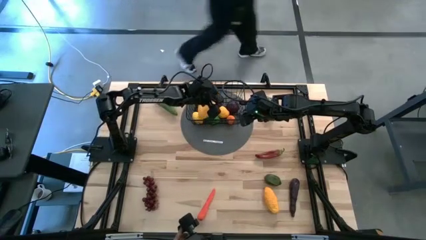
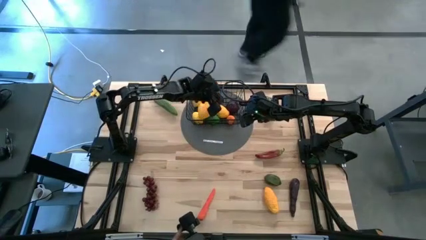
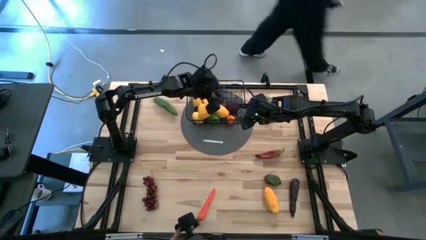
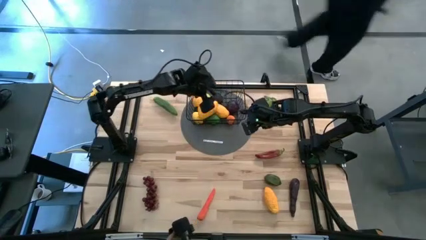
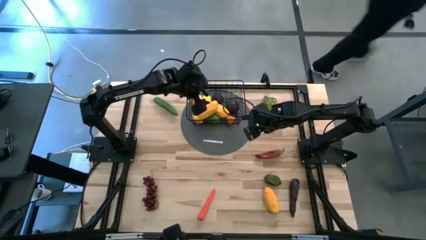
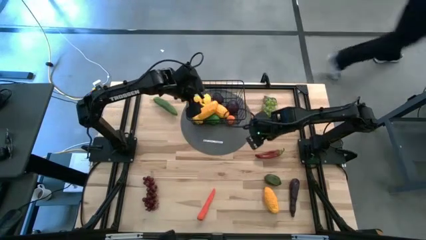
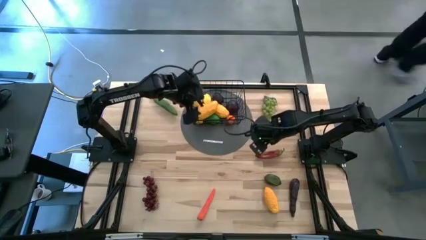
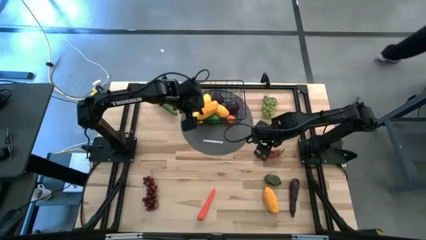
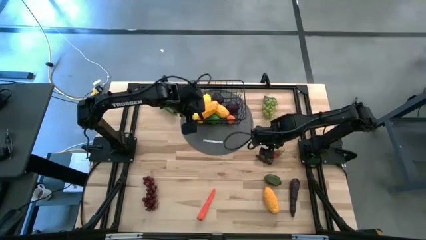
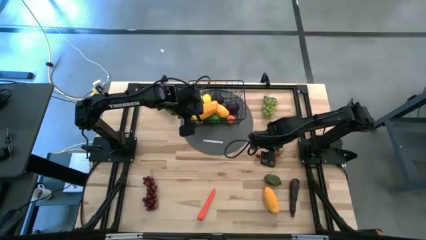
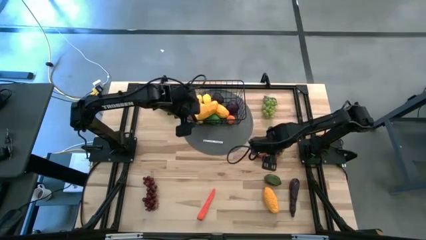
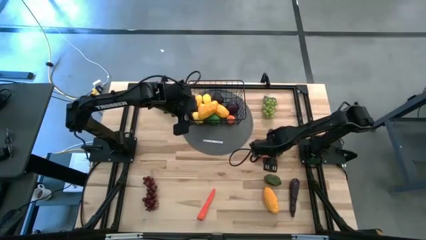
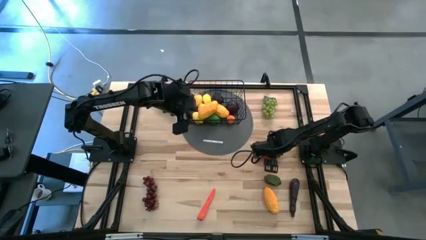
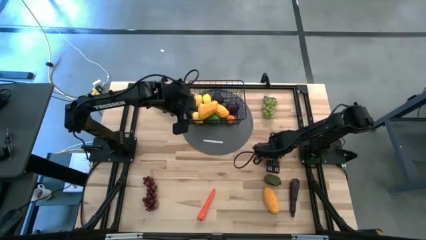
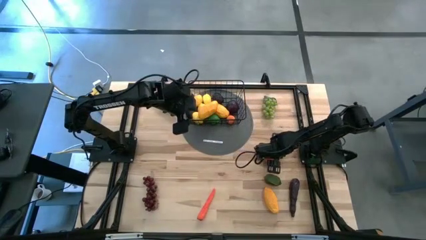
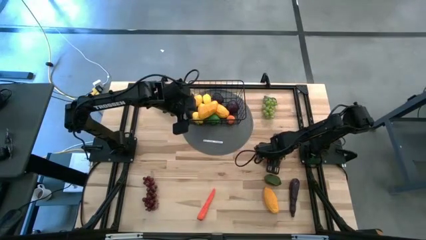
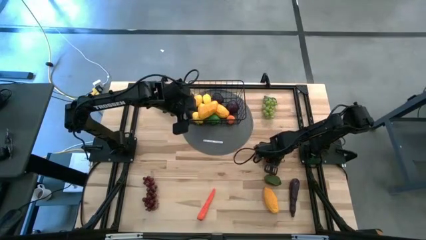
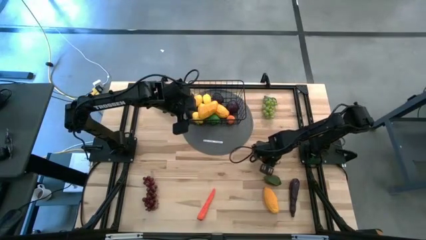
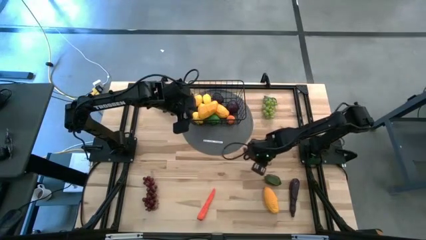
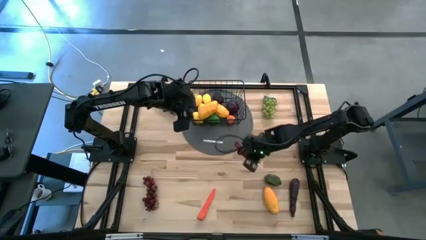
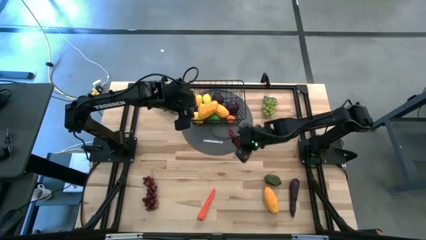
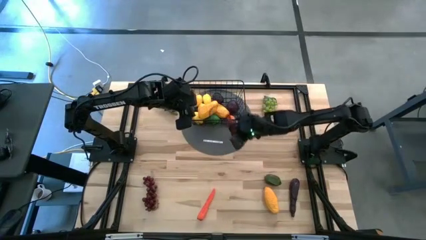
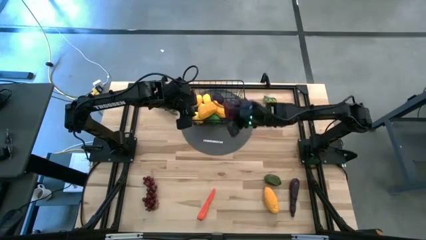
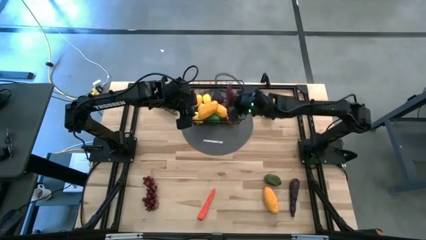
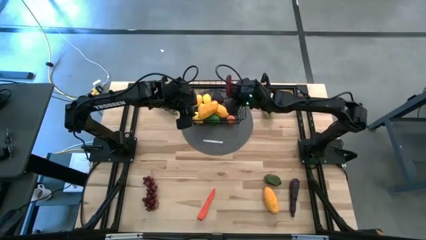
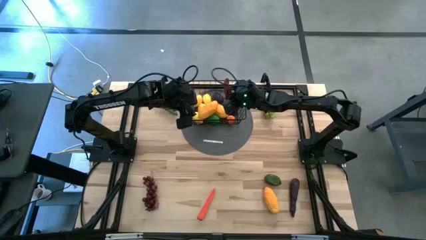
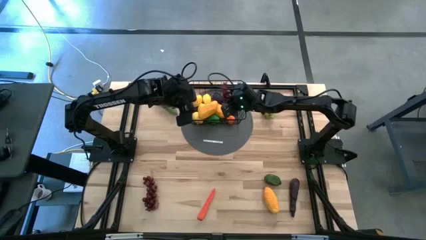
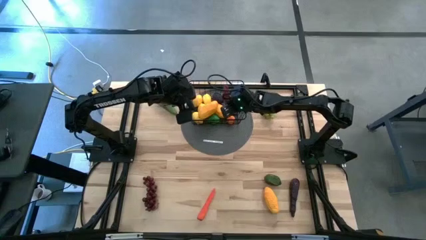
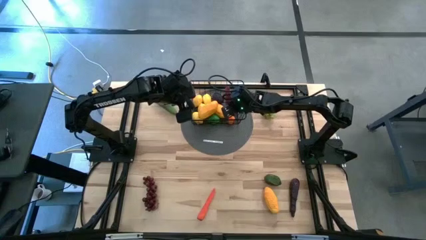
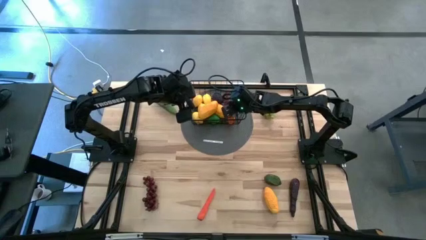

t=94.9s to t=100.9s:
Task: Build produce basket
Put the red chili pepper into the basket

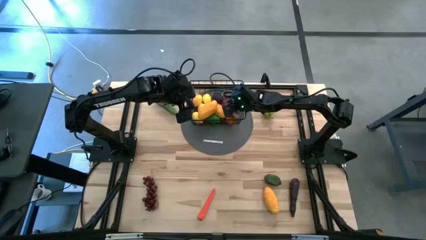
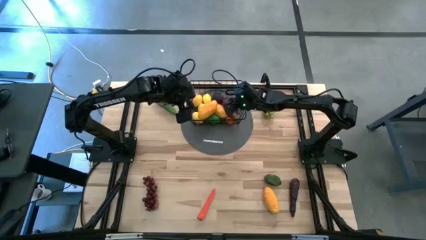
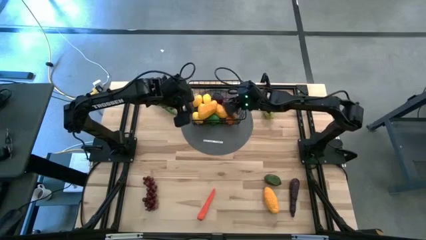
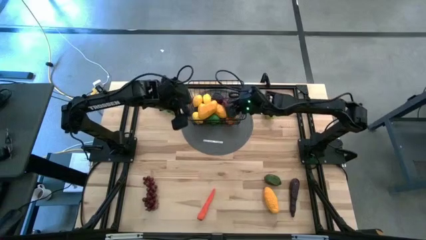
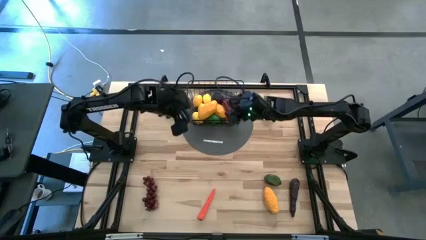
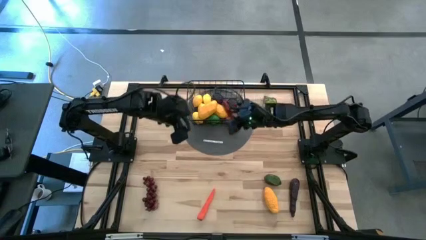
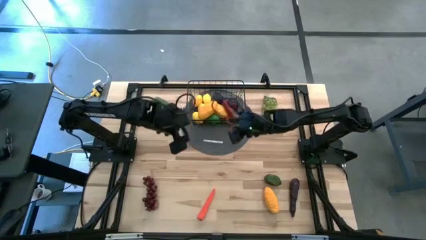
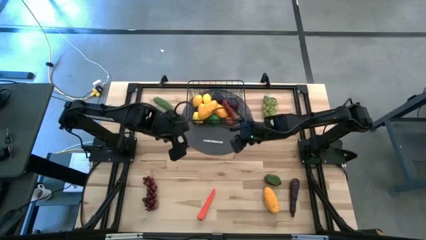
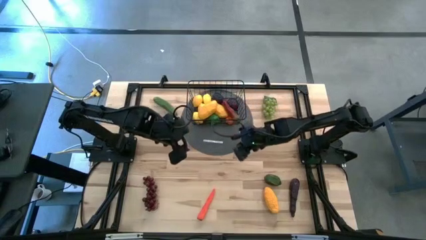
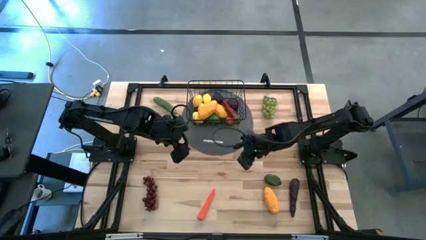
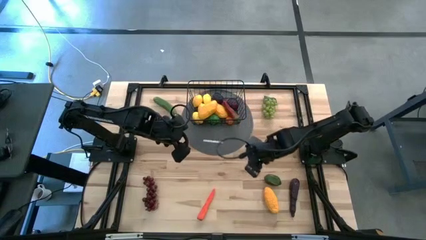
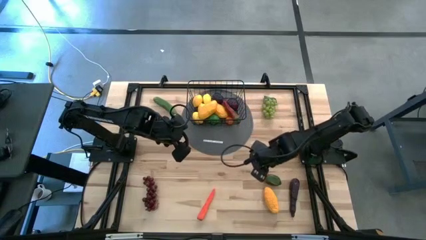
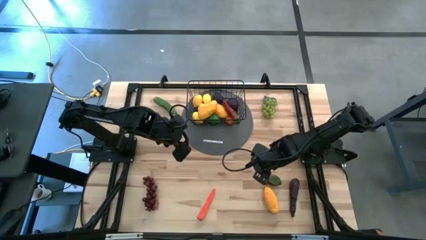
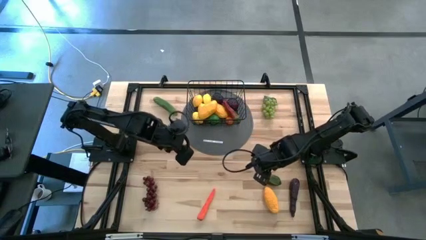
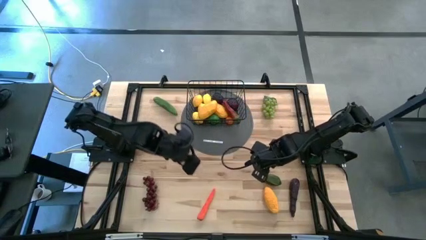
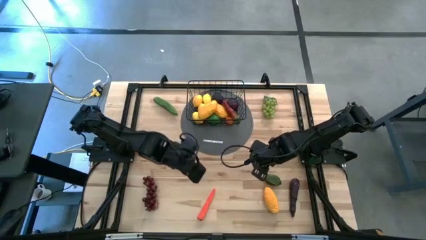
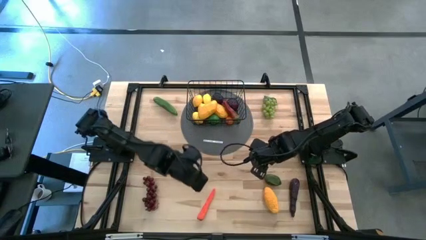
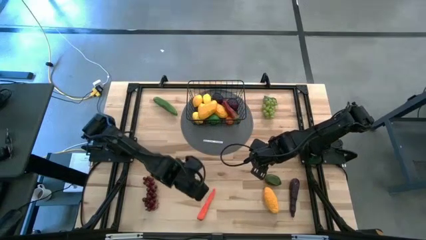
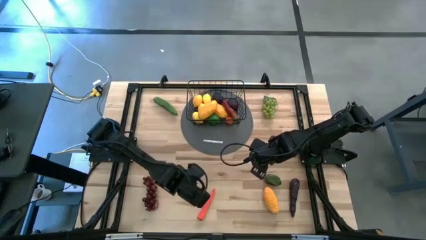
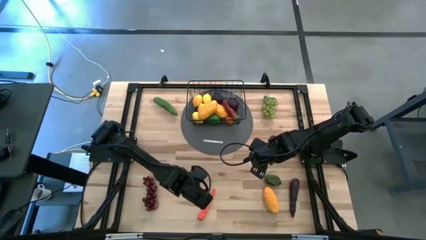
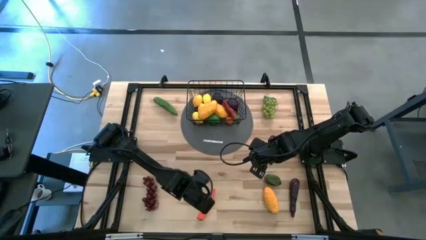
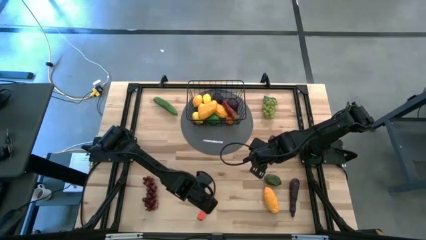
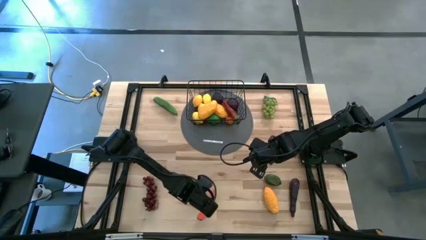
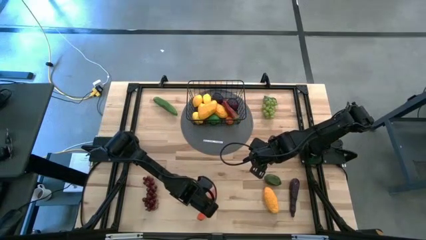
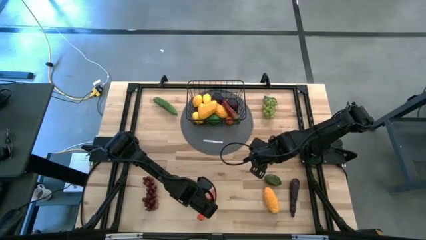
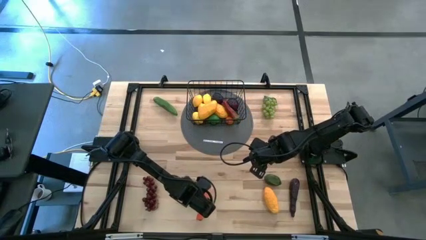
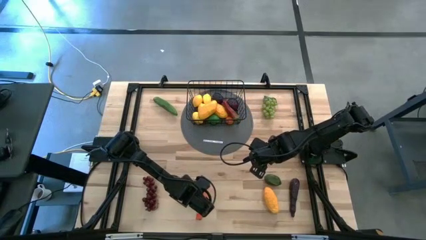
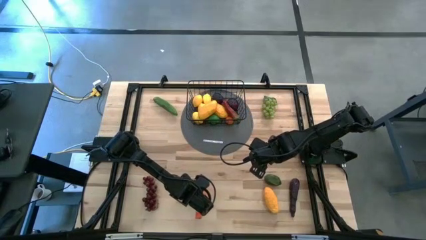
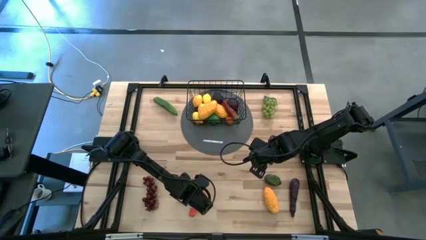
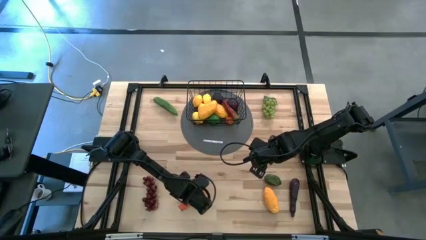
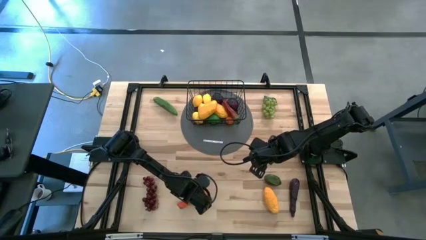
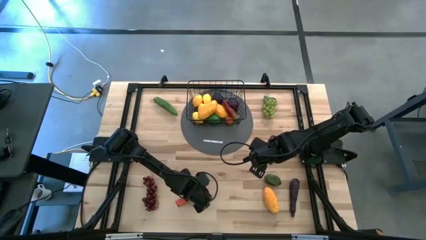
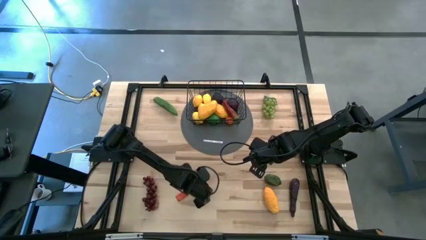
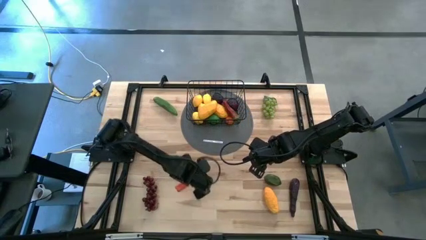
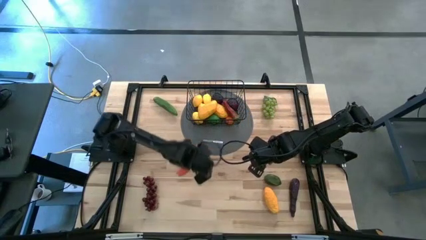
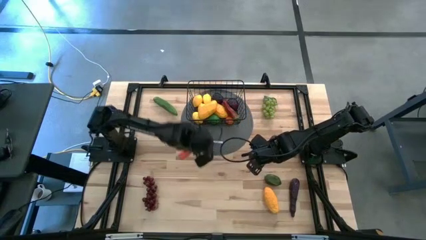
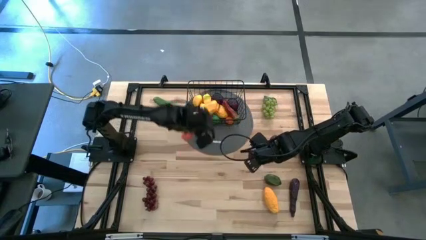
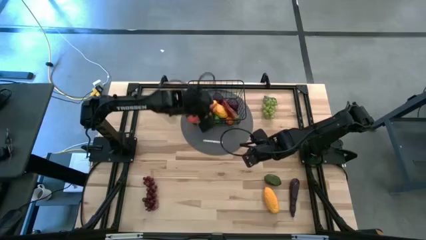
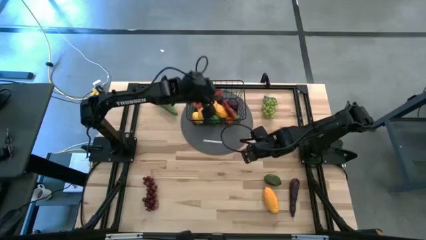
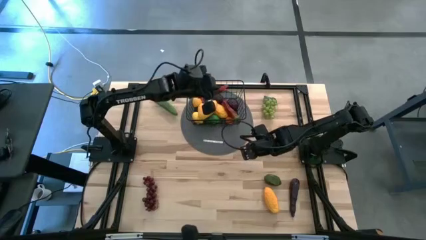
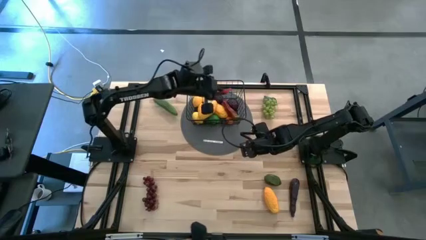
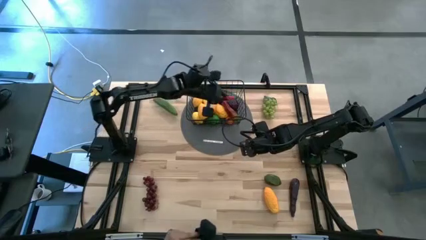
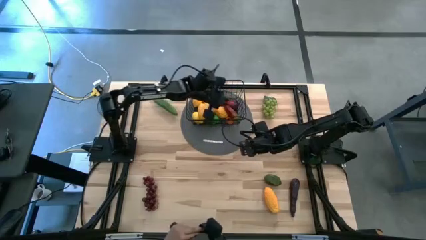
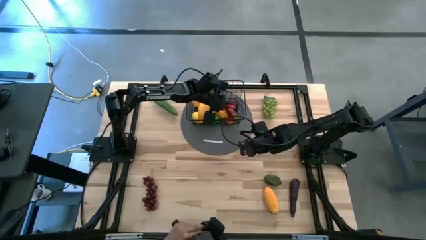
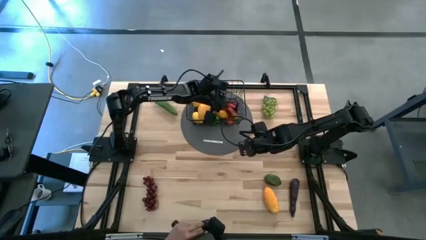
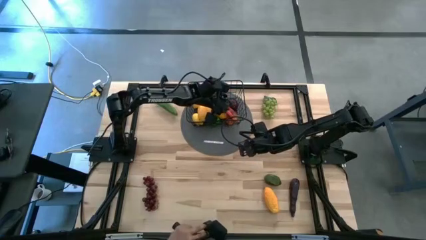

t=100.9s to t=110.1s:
Put the orange carrot into the basket

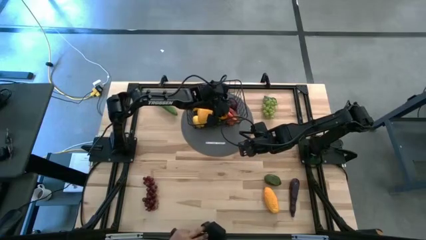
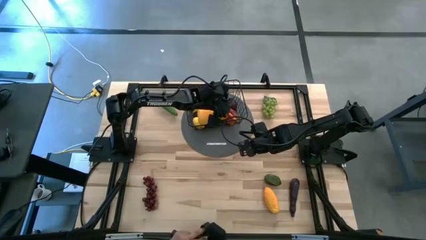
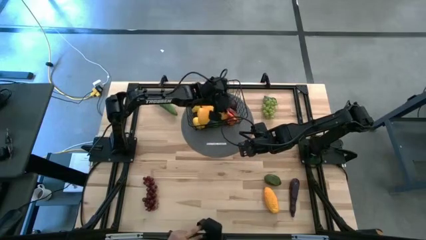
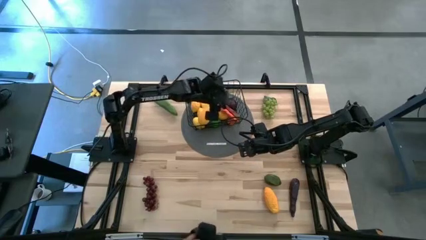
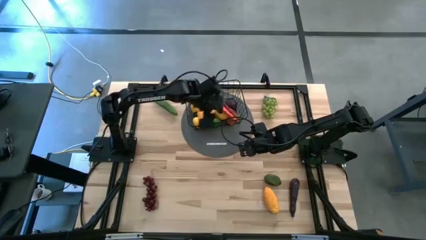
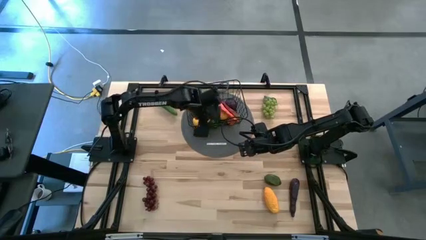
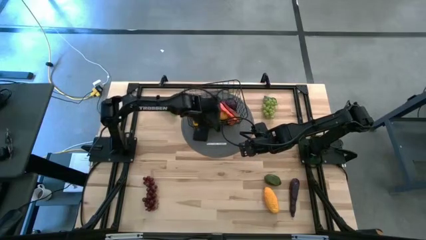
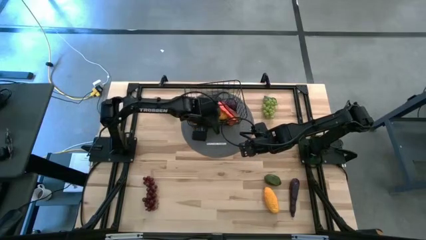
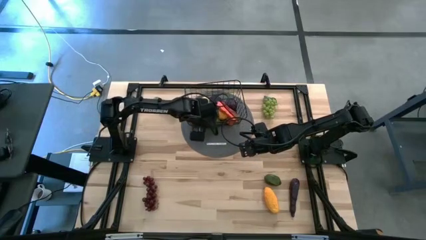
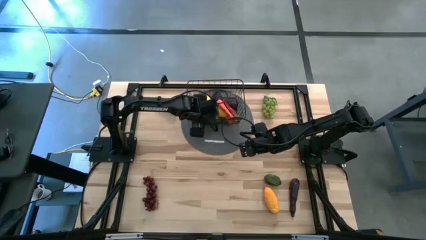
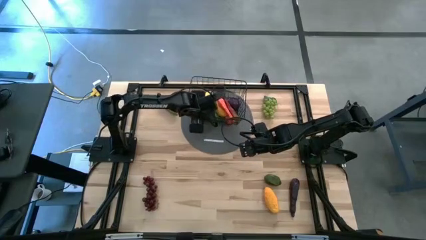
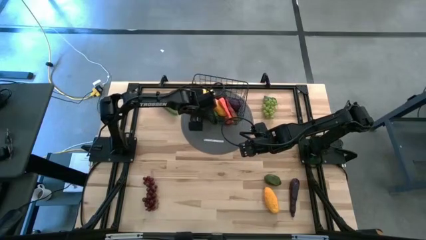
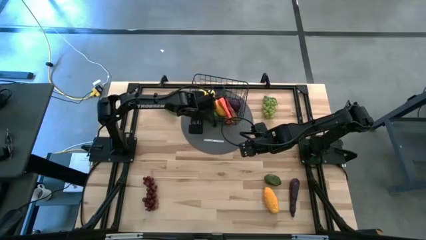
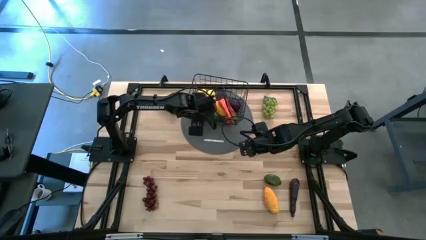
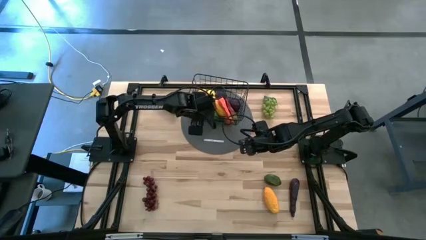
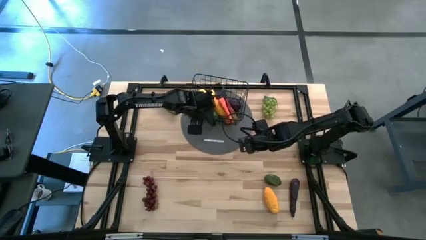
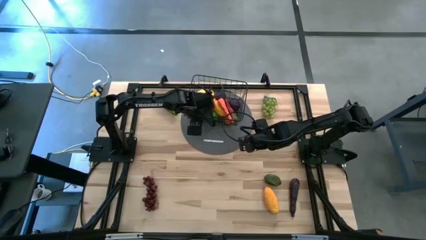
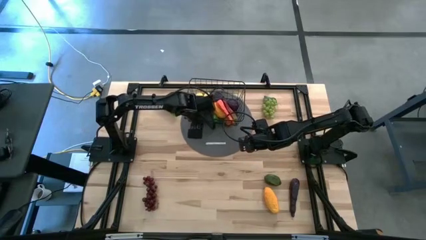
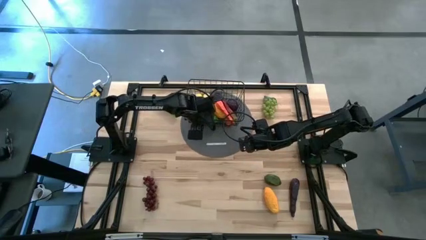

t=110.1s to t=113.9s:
Adjust the basket on the table
